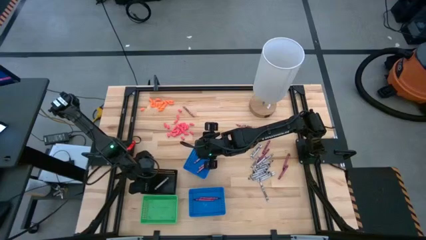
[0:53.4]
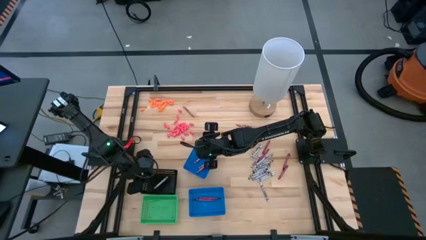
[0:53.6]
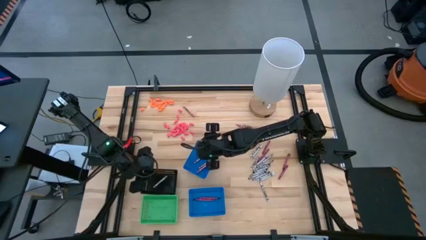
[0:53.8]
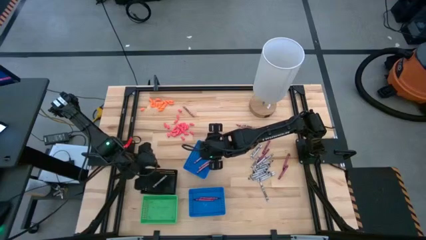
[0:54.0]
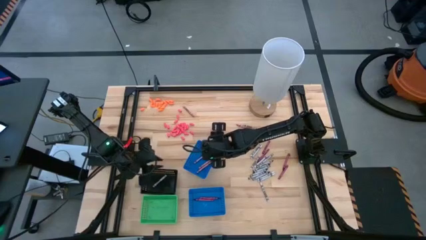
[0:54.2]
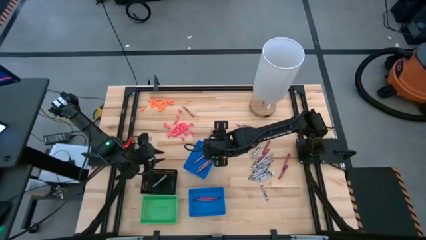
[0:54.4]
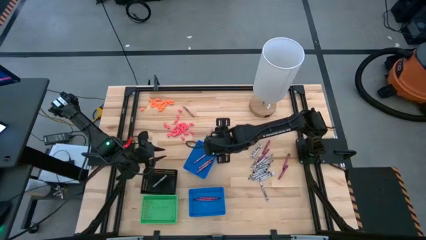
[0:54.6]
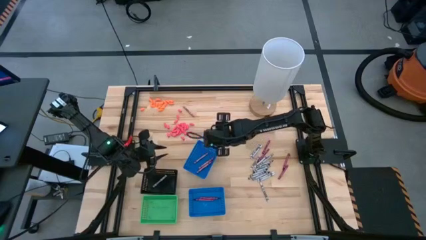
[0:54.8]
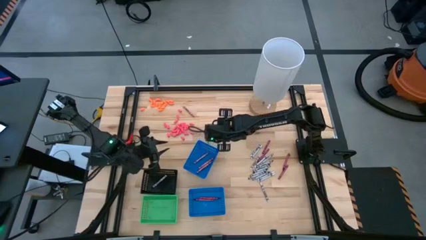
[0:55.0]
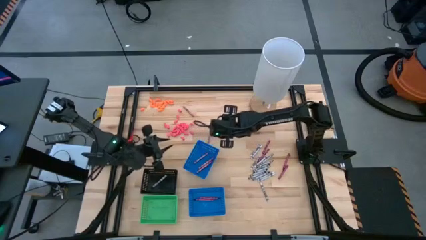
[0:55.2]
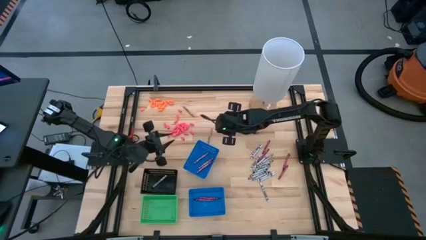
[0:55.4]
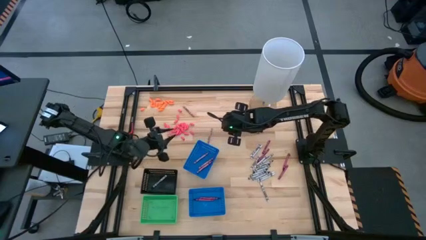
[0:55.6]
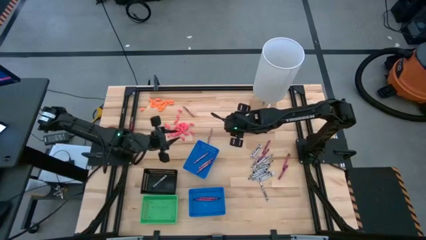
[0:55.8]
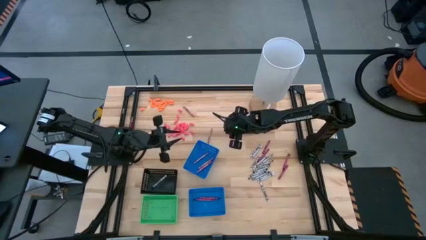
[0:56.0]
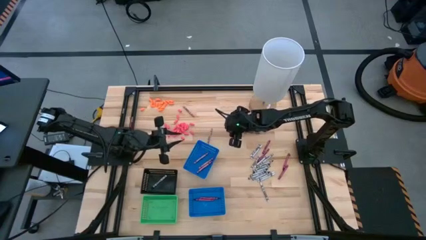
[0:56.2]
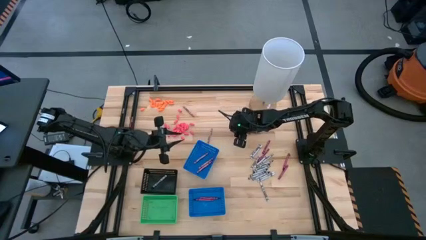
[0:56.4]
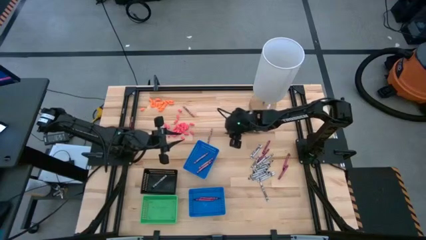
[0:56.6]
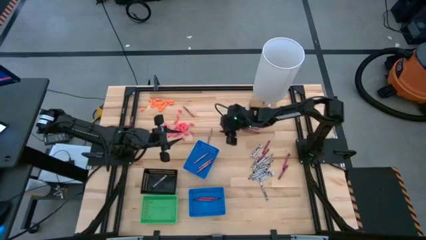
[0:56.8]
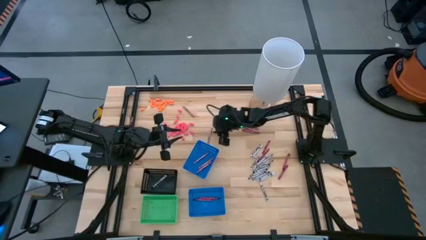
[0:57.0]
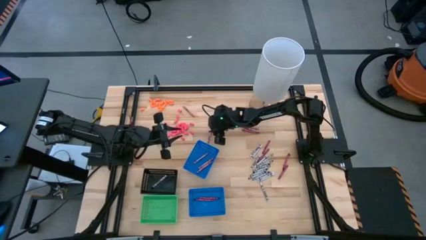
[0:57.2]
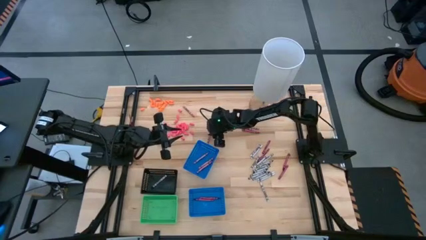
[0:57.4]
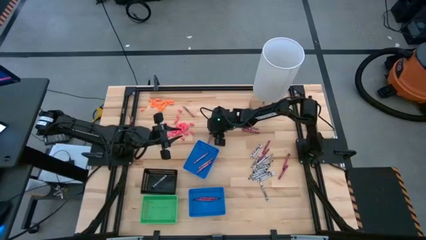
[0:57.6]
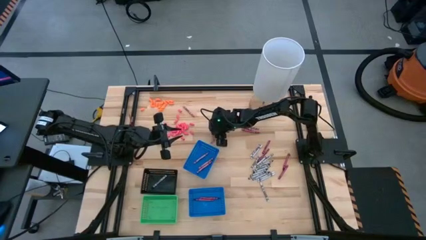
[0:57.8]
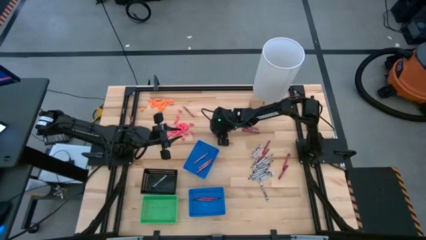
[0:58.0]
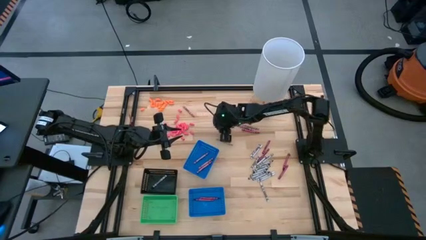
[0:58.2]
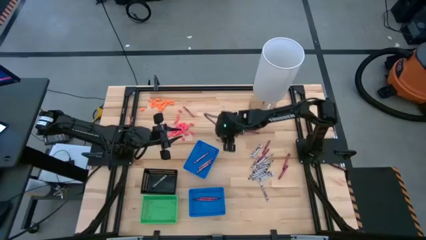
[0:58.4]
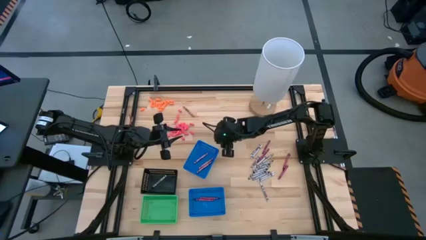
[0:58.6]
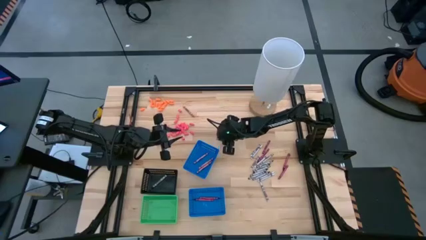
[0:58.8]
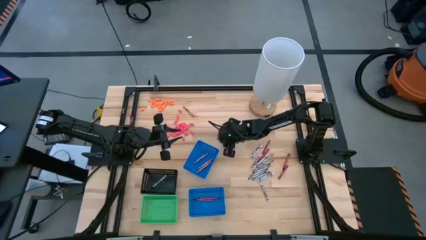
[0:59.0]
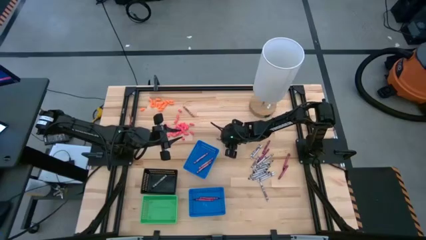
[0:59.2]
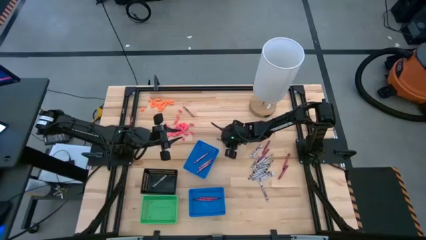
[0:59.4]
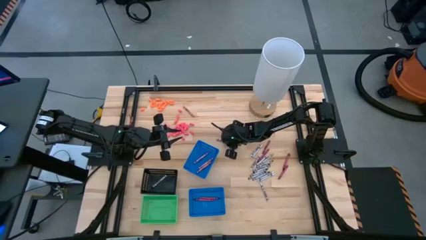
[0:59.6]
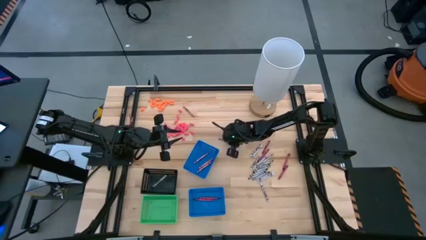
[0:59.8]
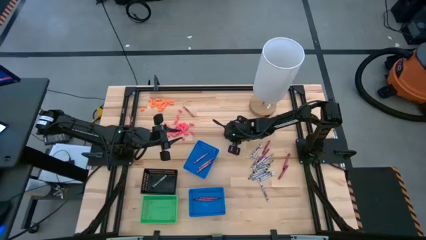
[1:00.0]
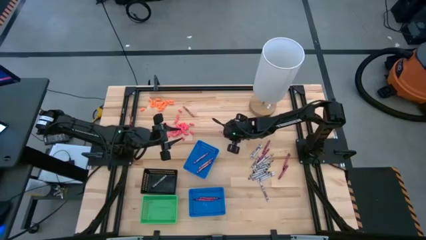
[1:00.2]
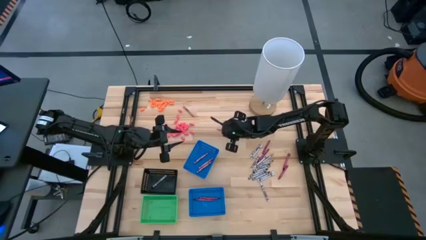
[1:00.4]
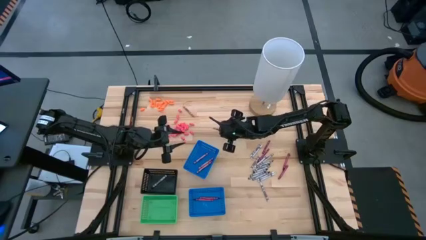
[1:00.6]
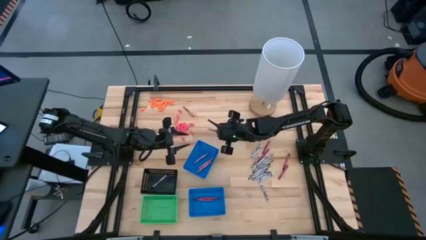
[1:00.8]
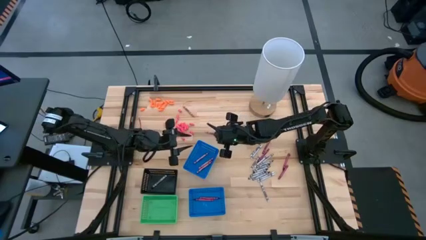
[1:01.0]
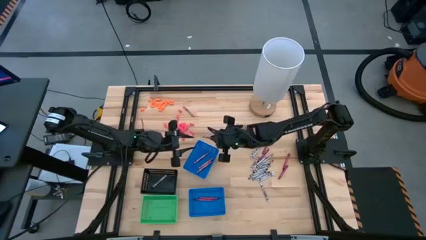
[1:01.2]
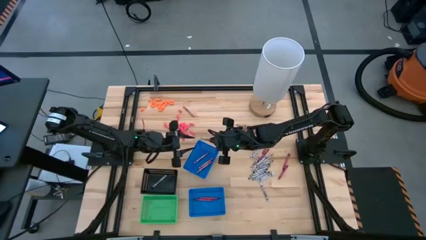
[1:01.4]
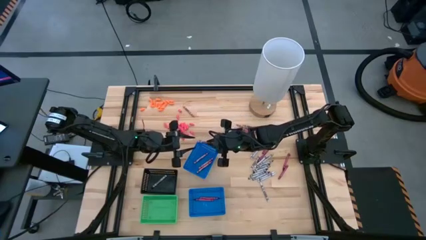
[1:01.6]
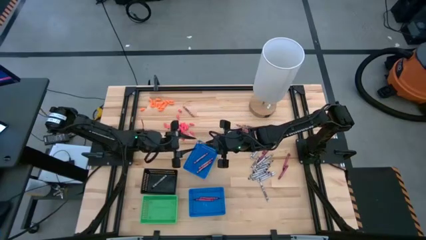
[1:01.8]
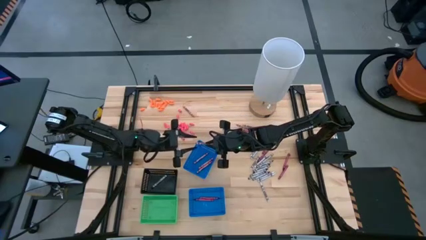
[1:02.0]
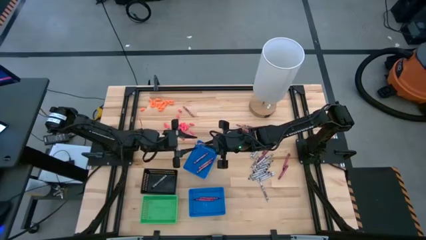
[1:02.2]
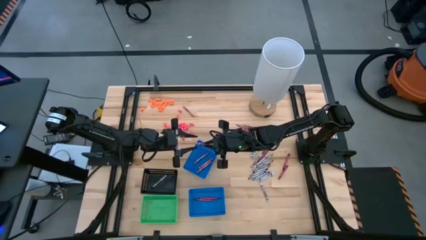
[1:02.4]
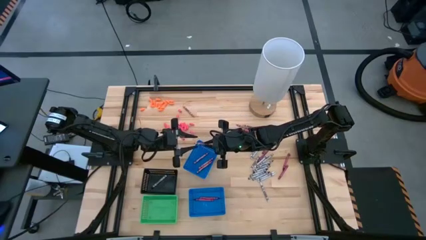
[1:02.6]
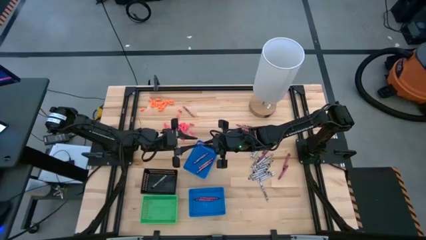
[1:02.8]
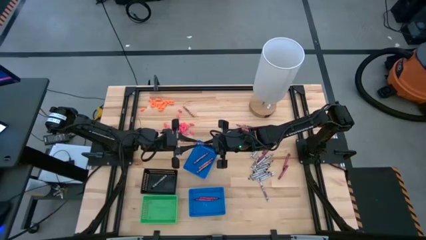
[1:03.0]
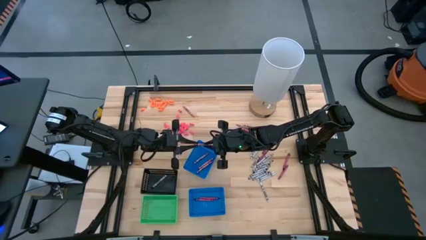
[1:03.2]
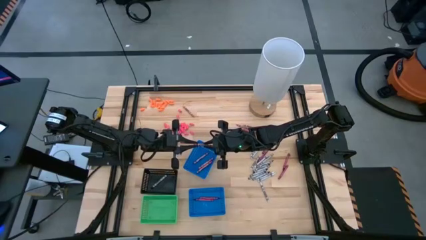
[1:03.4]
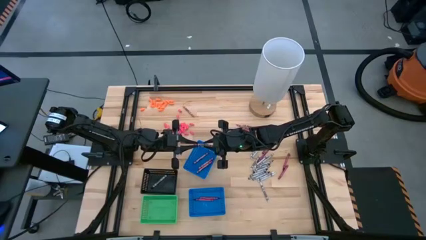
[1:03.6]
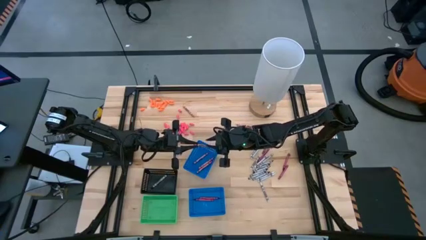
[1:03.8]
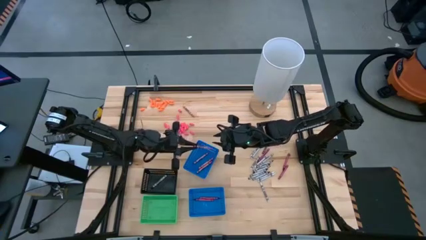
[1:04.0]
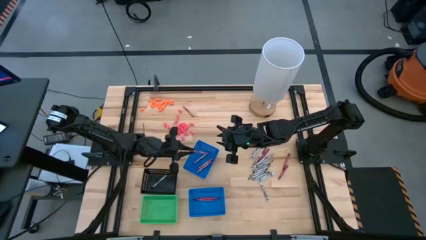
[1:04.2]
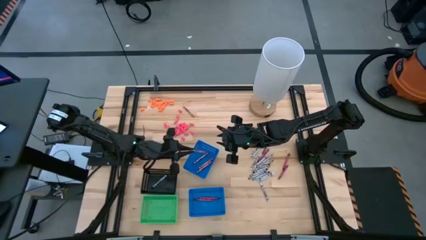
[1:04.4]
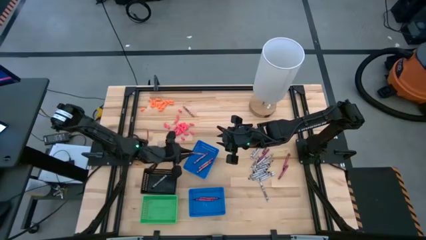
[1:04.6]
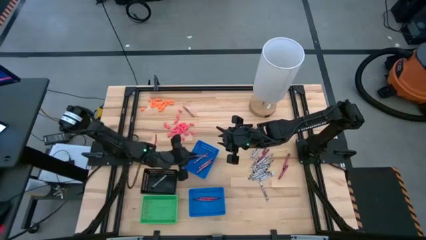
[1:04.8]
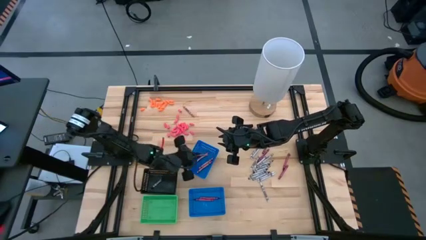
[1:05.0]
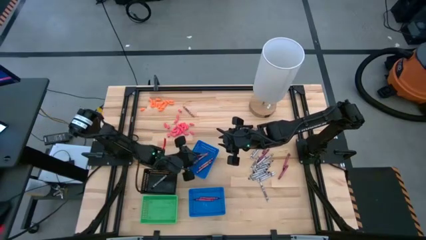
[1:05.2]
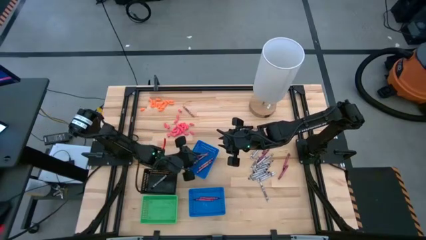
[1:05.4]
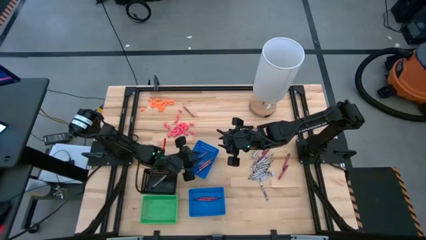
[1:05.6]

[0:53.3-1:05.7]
Task: Sort crayons
Put the pink crayon into the top blue bin
